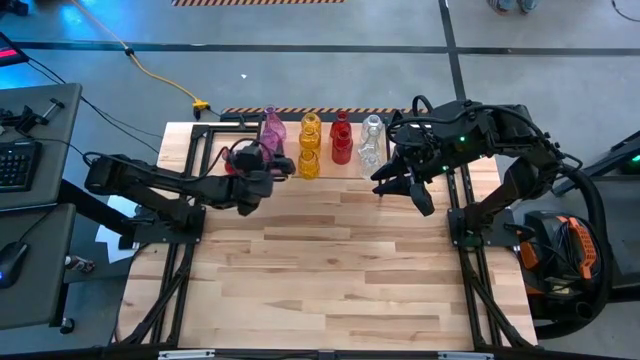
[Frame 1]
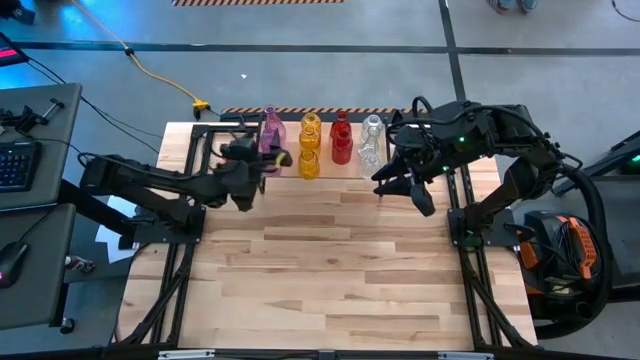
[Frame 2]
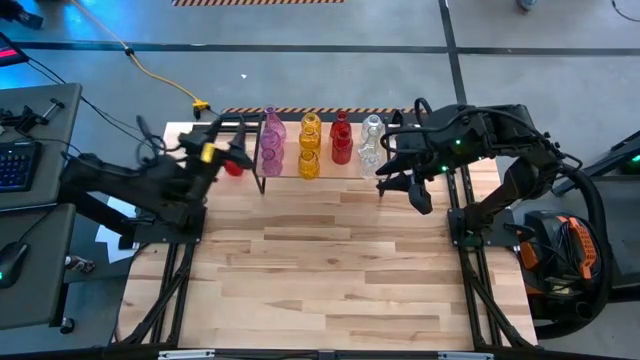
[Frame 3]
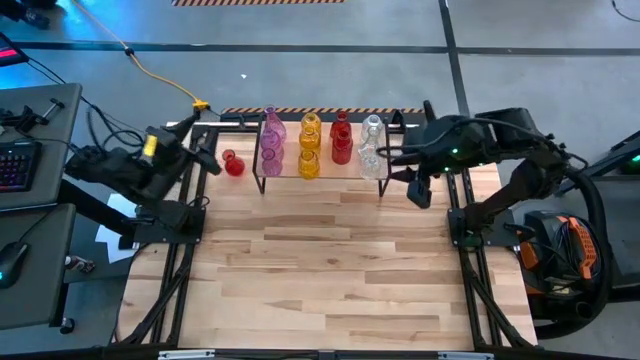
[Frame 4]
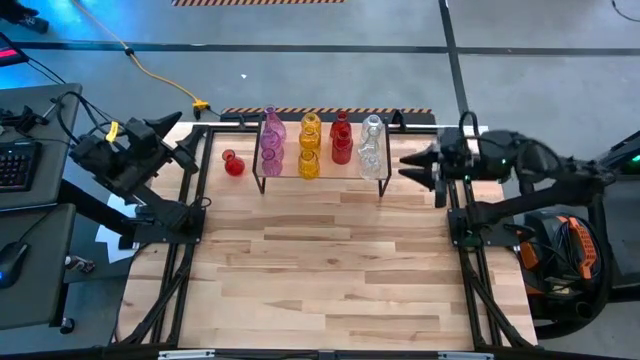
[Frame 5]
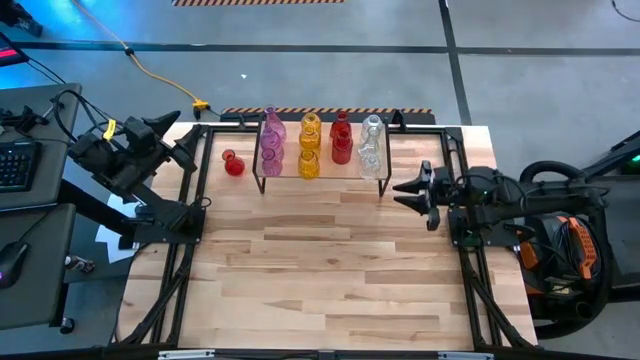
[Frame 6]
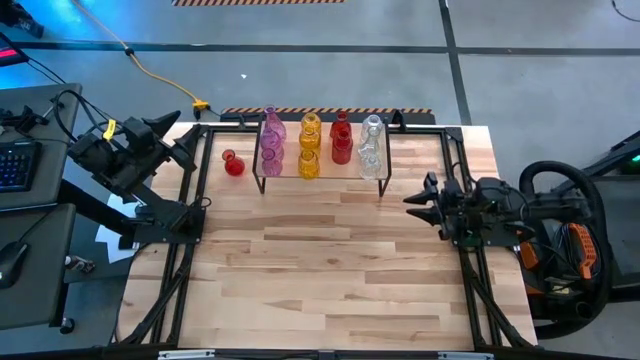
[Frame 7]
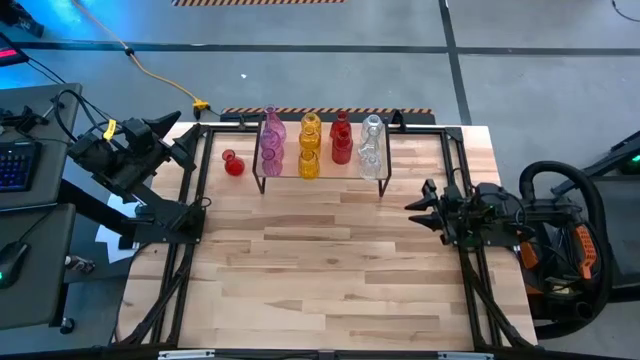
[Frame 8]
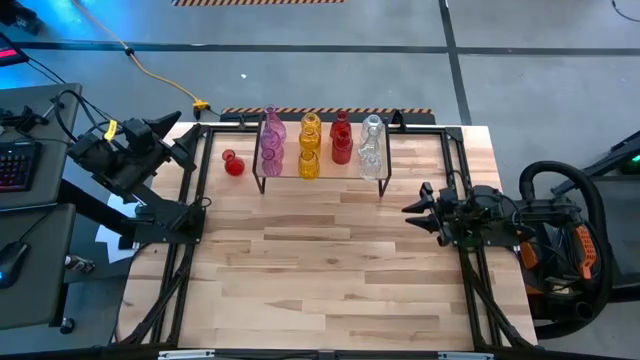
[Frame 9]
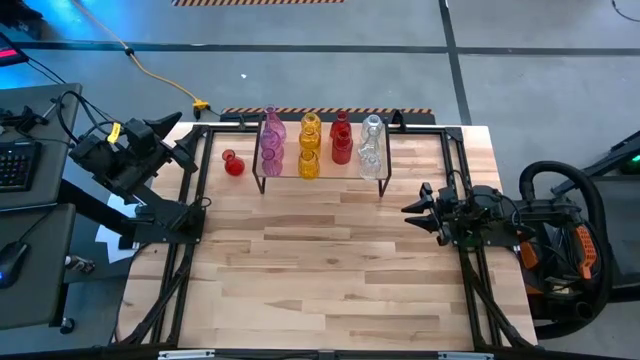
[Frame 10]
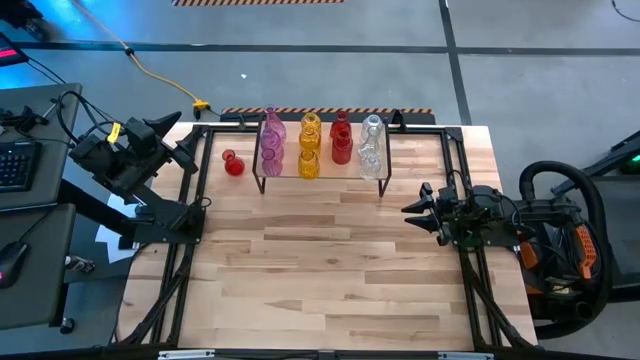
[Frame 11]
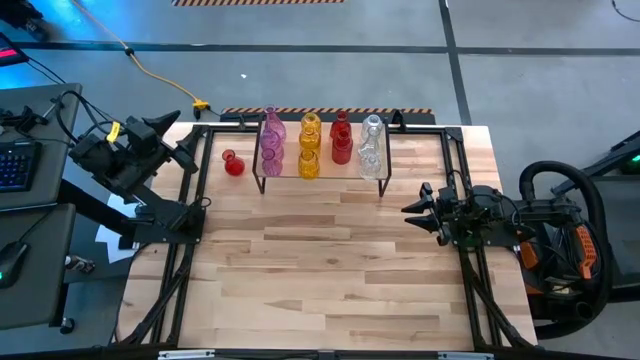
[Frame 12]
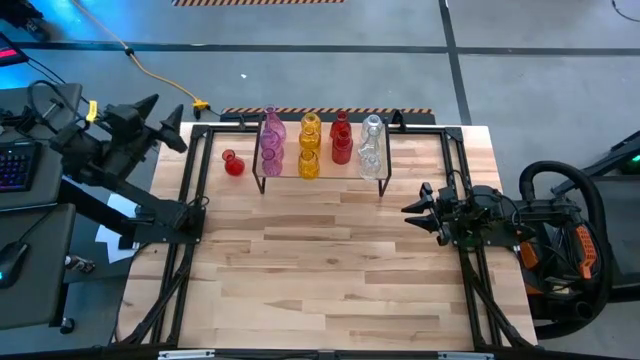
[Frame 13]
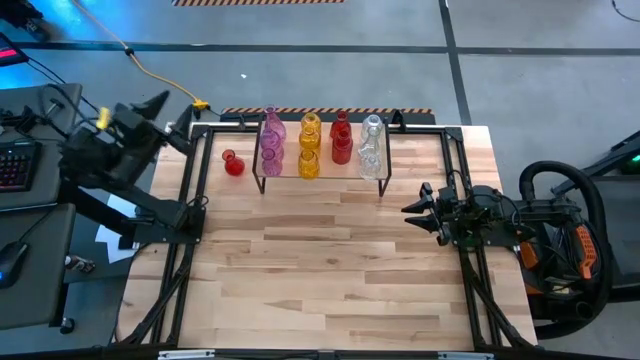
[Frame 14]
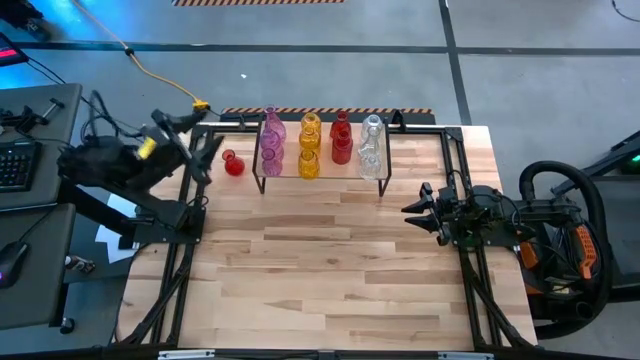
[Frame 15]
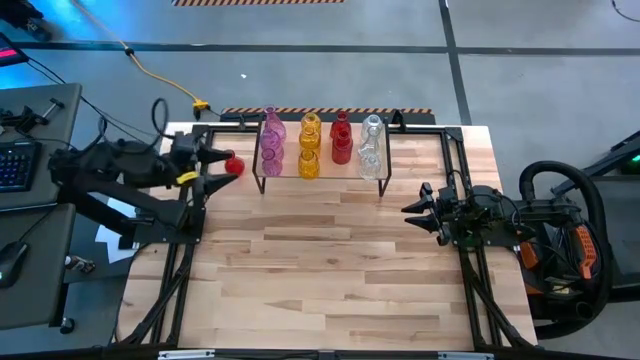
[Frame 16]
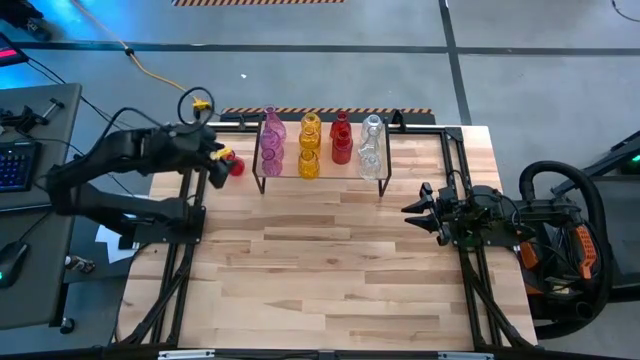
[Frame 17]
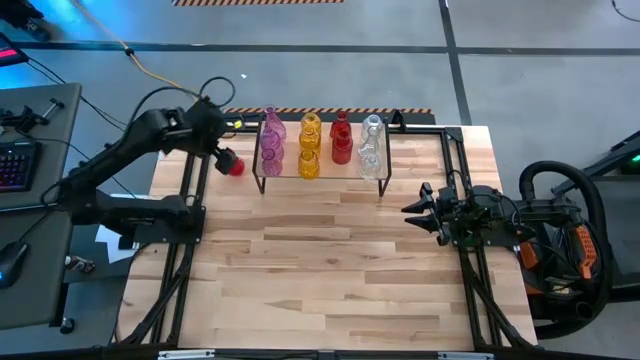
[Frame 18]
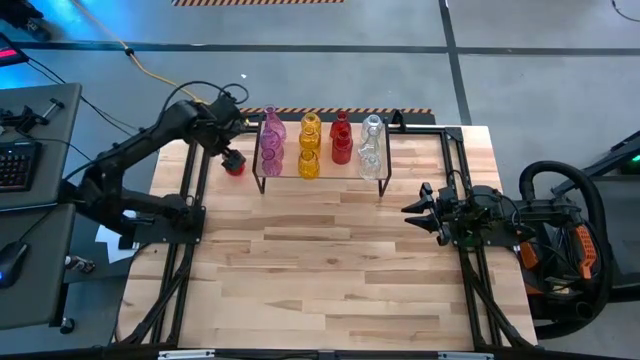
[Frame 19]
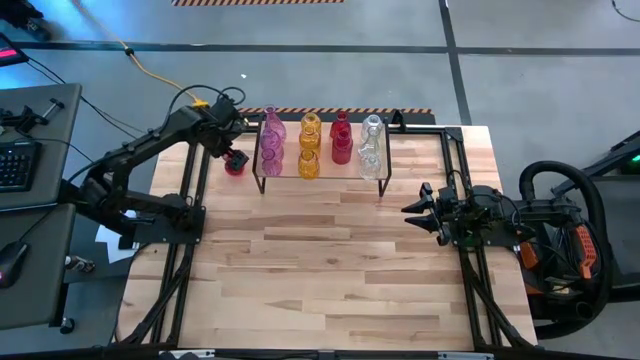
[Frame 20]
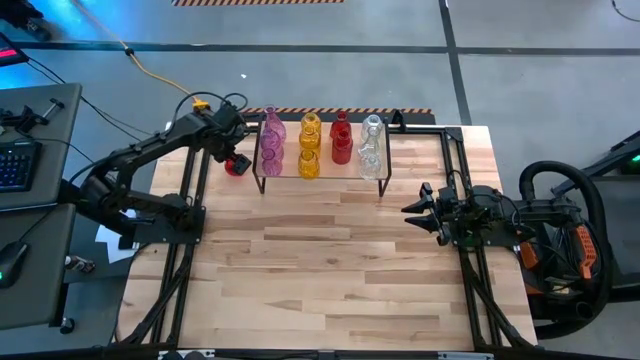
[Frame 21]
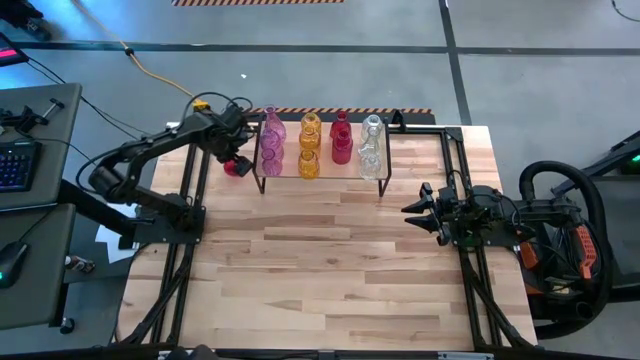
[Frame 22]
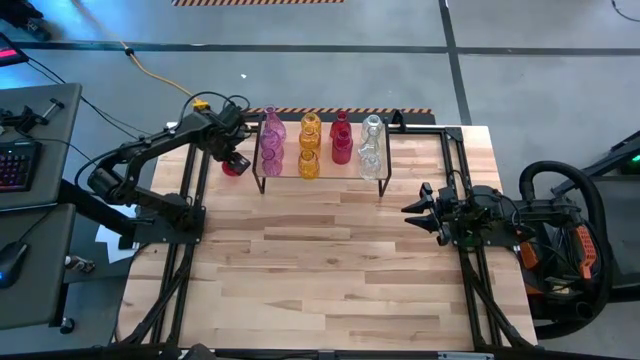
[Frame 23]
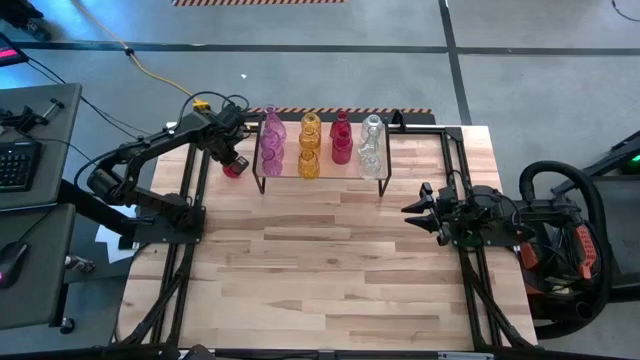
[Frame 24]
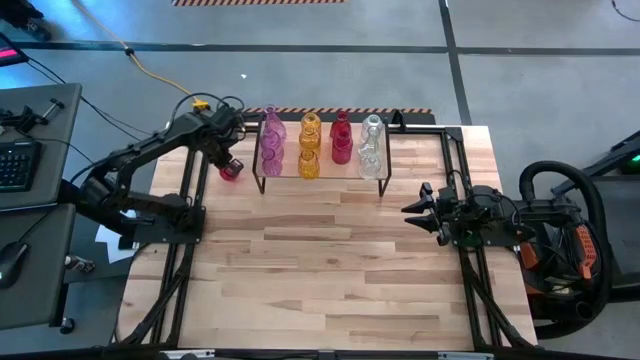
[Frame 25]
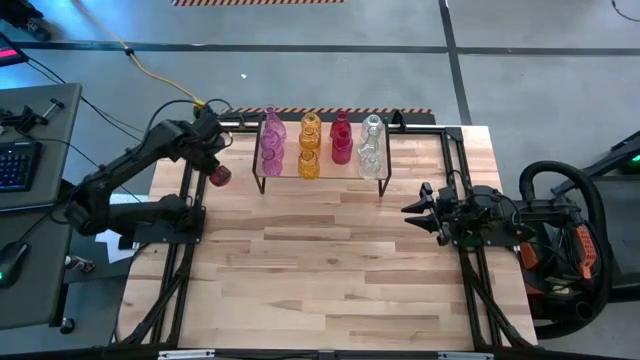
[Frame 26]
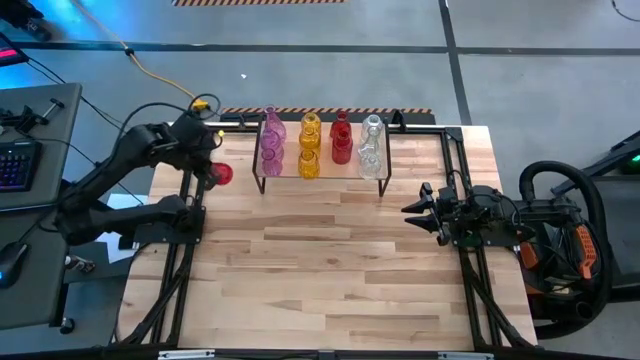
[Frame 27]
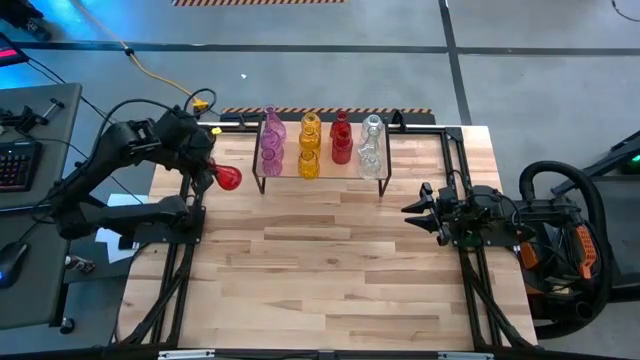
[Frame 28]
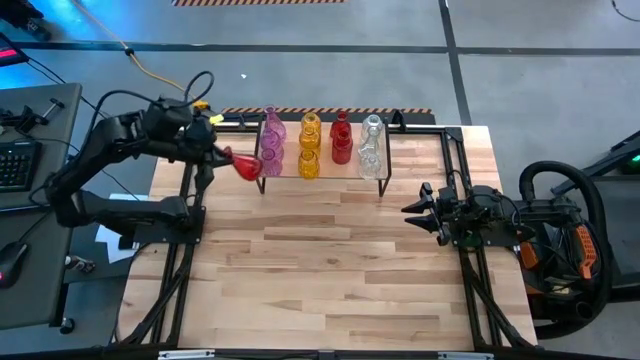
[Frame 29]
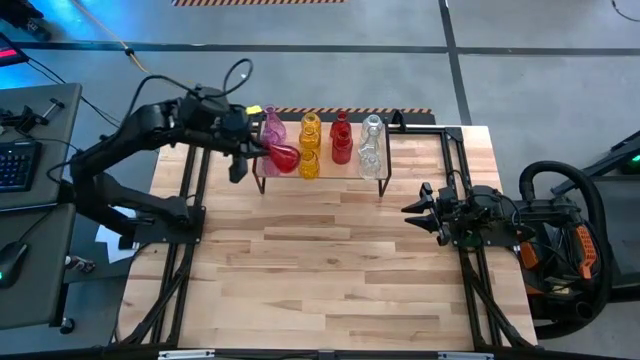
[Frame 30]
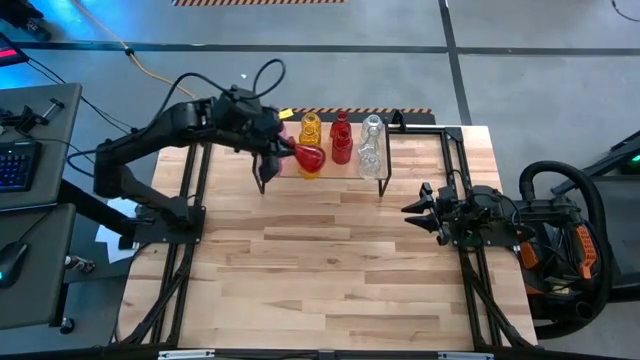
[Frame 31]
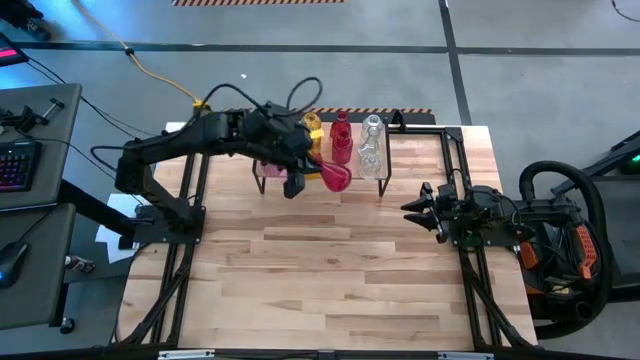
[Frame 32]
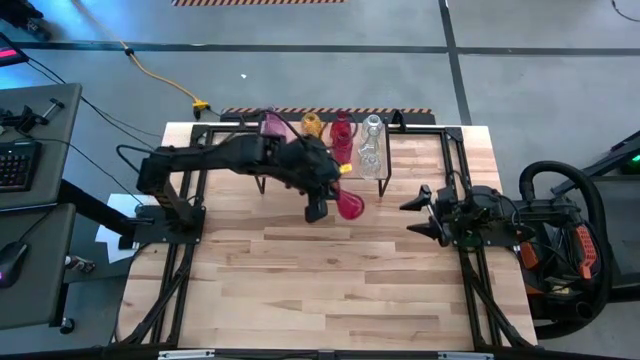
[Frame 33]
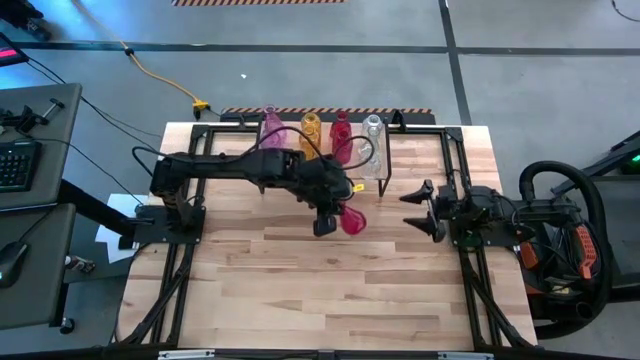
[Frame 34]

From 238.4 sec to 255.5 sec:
Task: sort vases onto shelf
Put the red vase on the shelf aligned with the other red vases

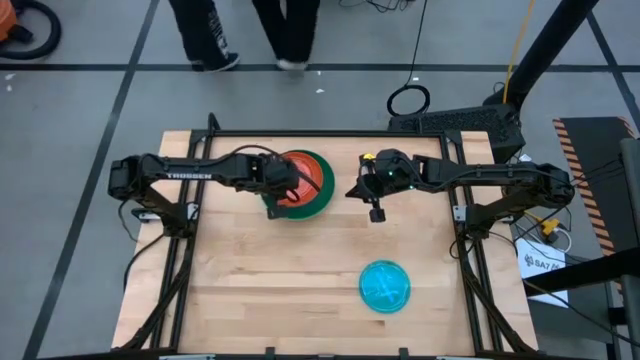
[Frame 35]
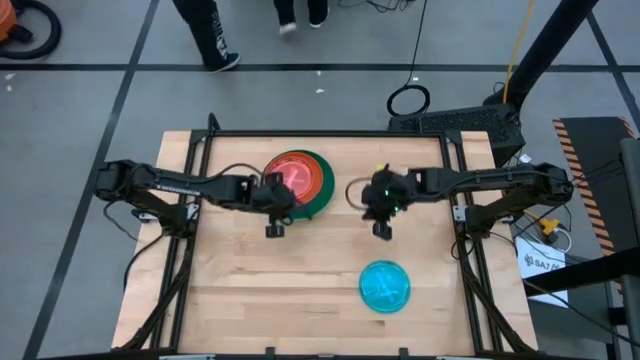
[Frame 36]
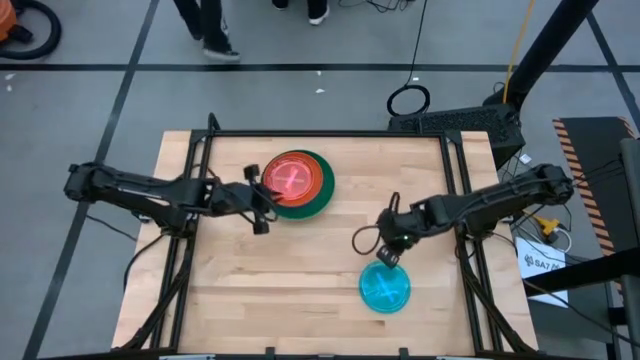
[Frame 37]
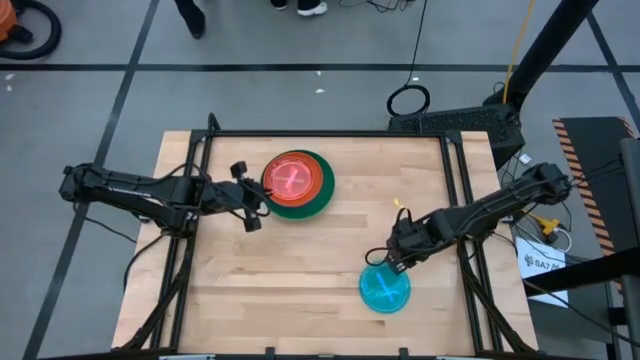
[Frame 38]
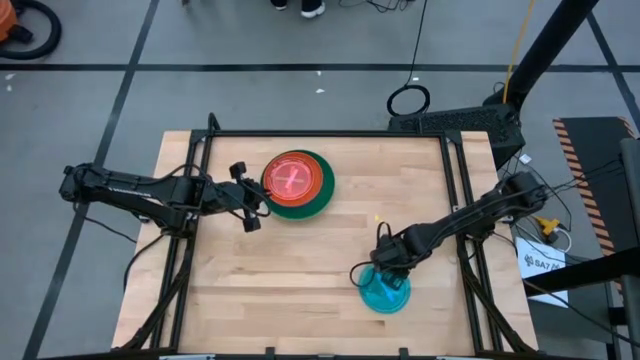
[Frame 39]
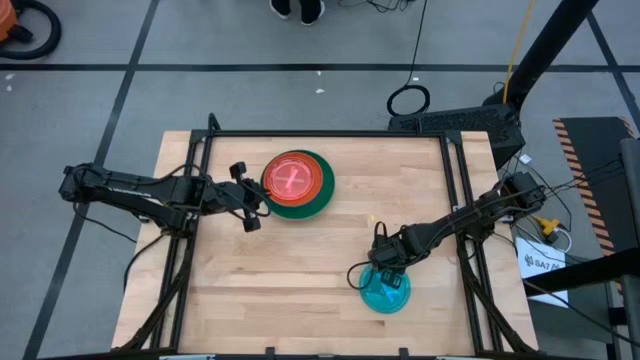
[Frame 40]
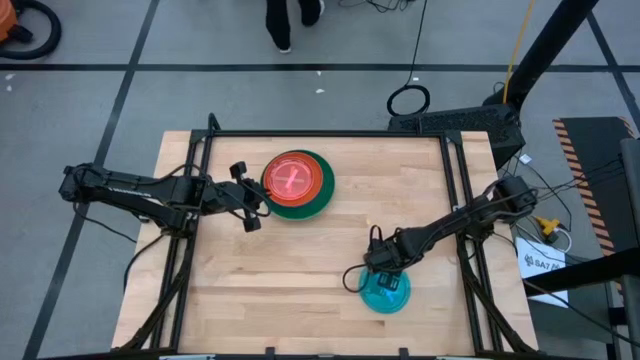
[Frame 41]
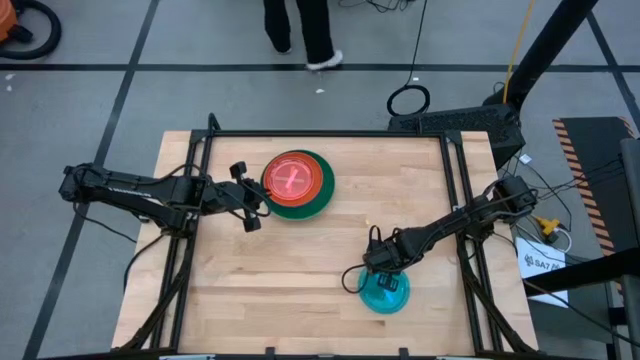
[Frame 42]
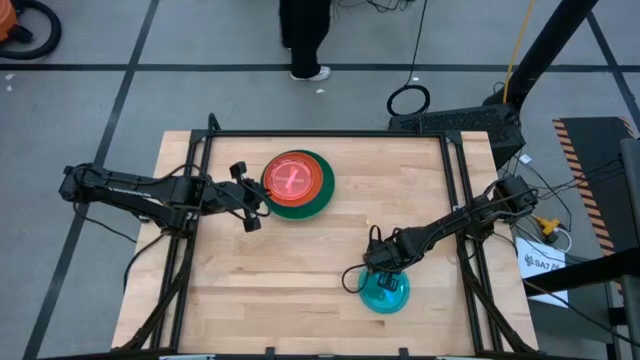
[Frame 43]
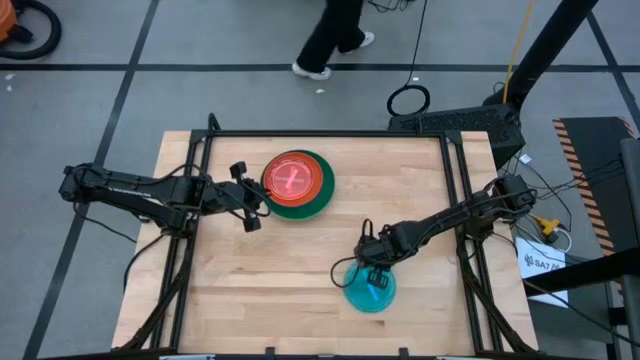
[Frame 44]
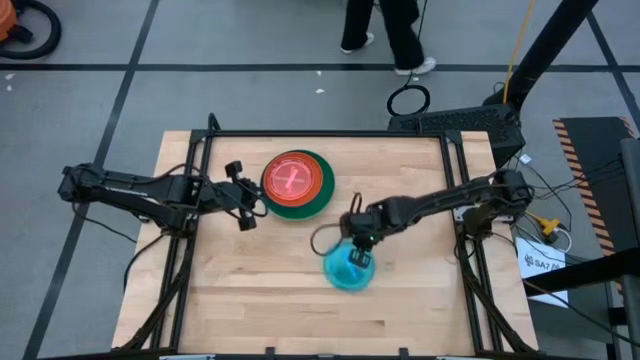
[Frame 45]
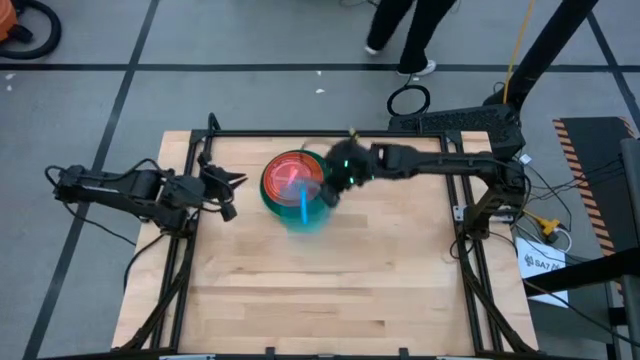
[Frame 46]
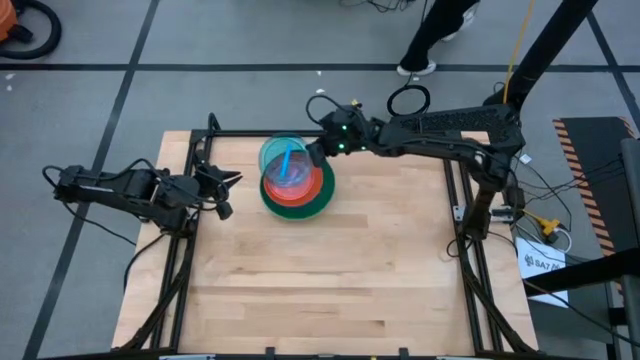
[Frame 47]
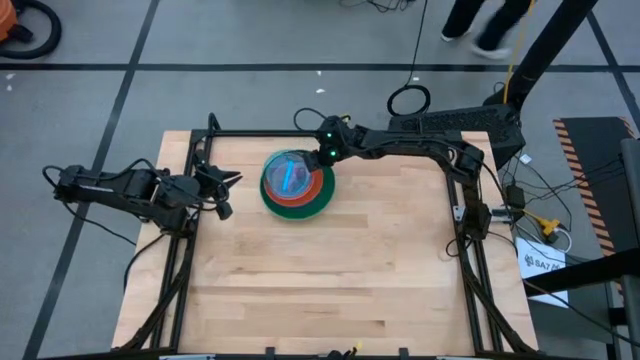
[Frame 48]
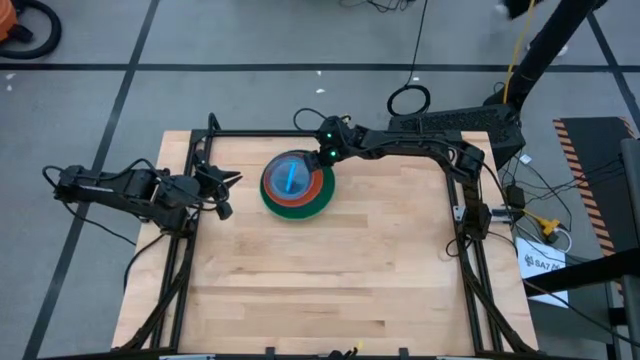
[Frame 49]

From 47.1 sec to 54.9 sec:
Task: Stack plastic plates
Stack the blue plate on top of the pink plate
